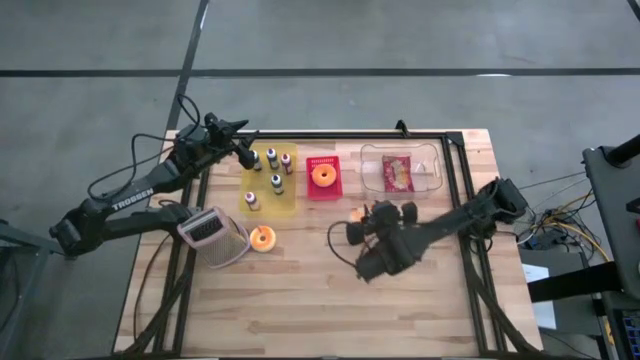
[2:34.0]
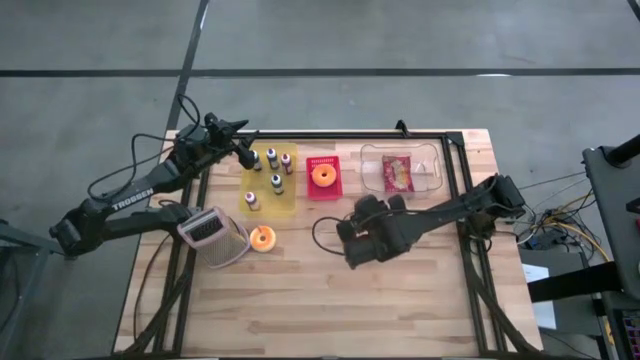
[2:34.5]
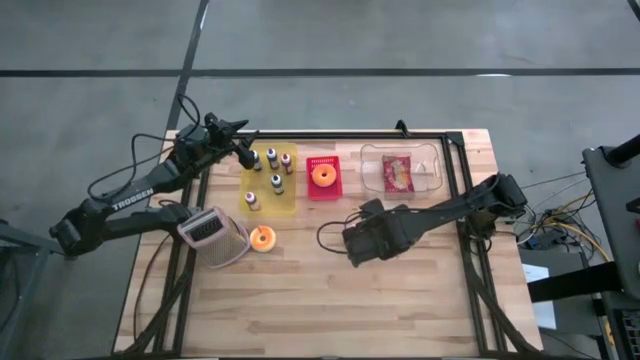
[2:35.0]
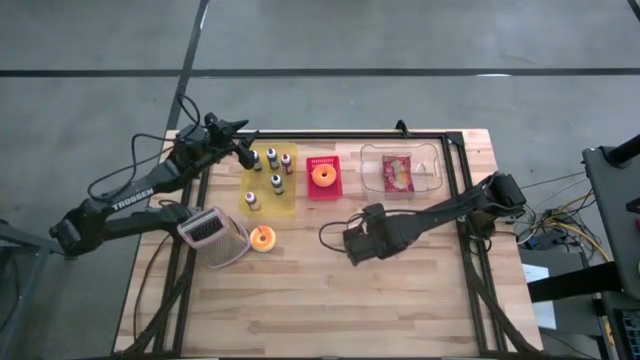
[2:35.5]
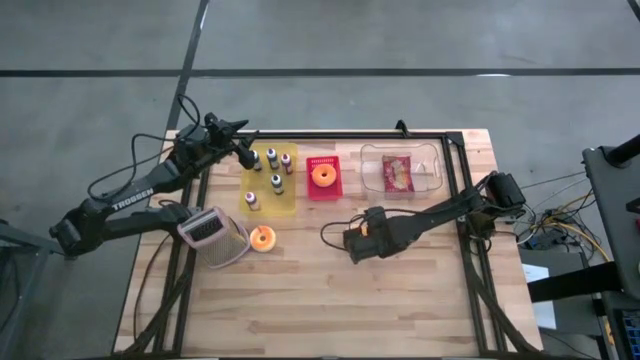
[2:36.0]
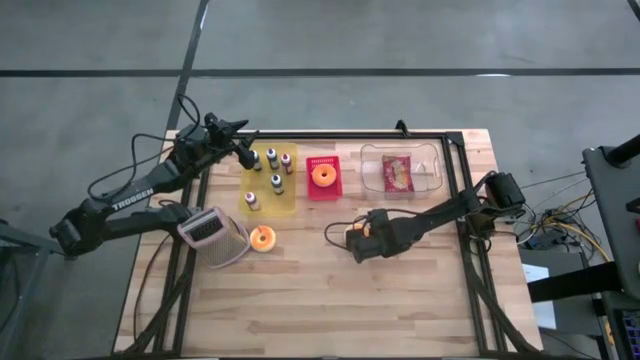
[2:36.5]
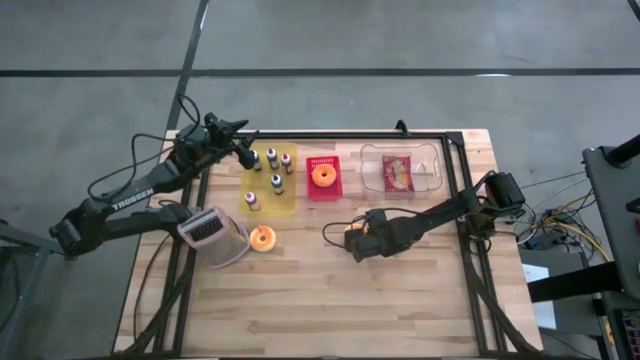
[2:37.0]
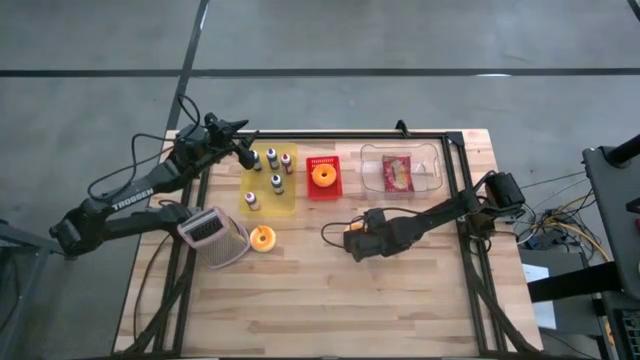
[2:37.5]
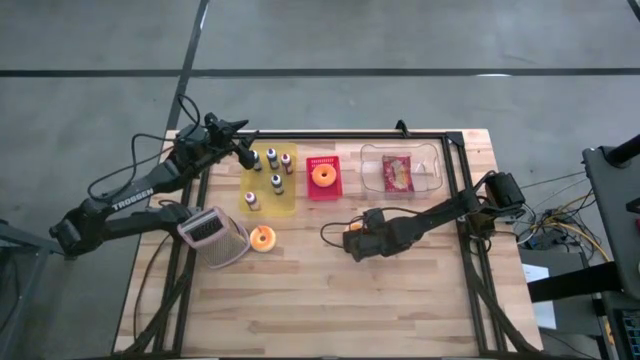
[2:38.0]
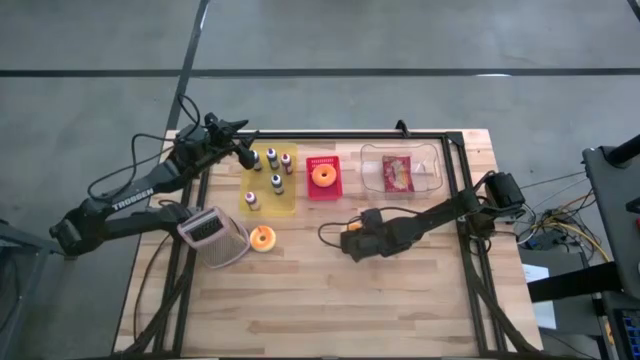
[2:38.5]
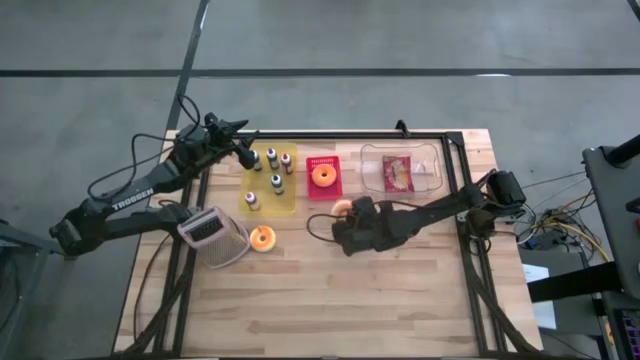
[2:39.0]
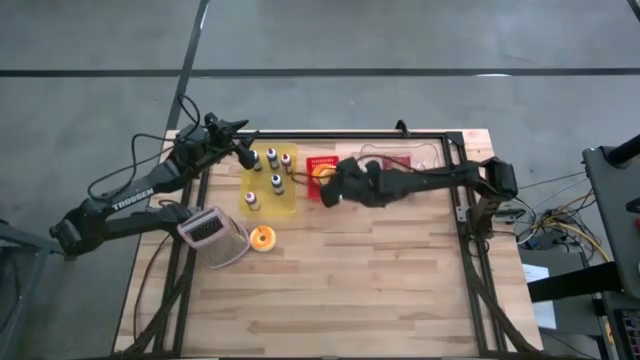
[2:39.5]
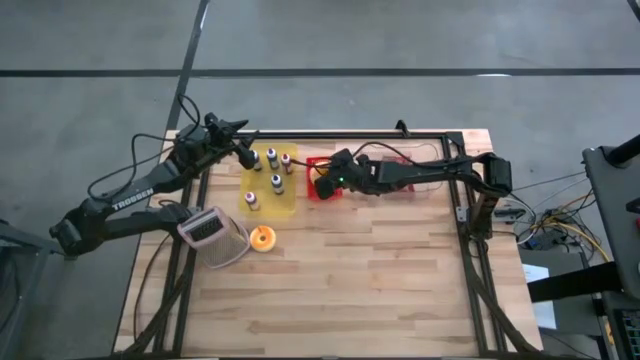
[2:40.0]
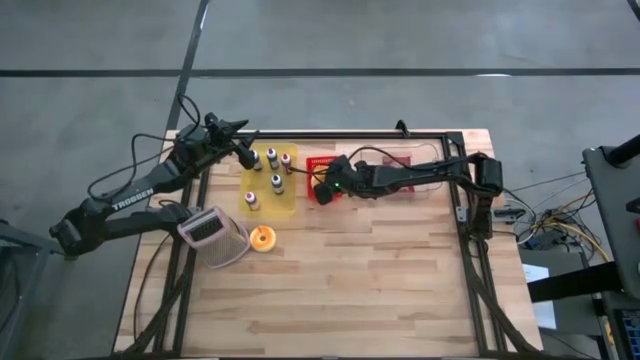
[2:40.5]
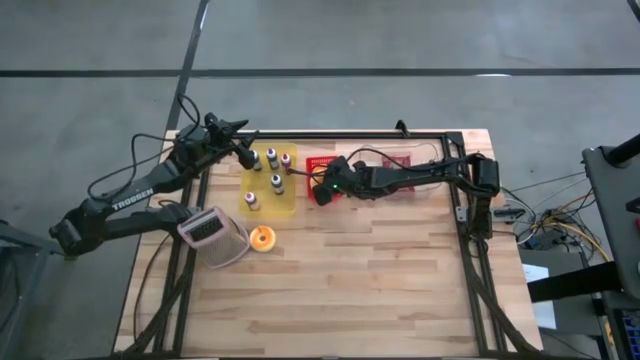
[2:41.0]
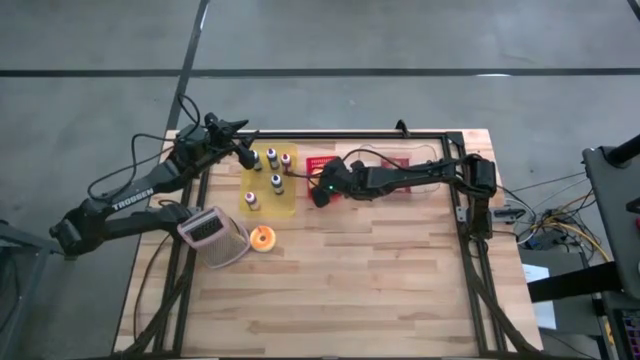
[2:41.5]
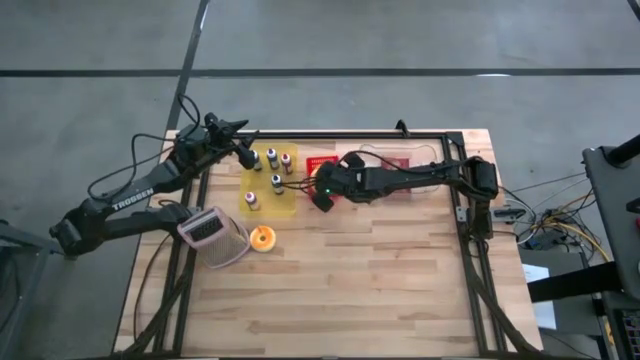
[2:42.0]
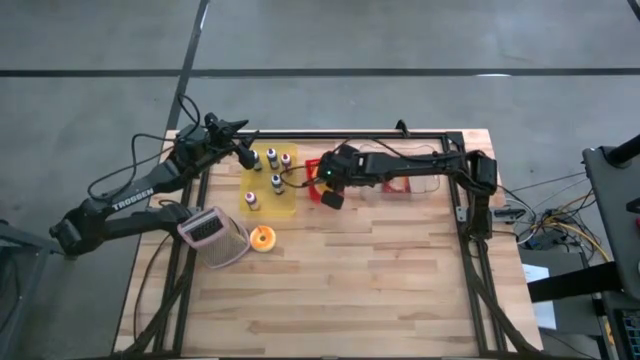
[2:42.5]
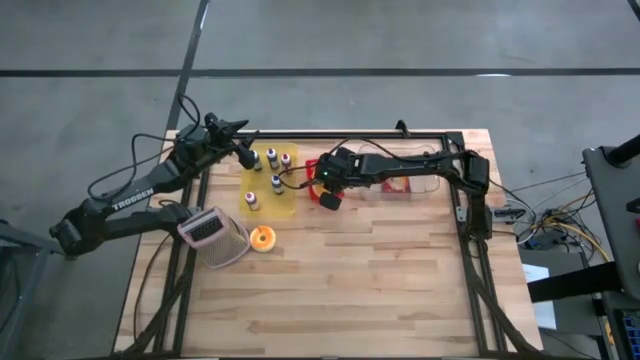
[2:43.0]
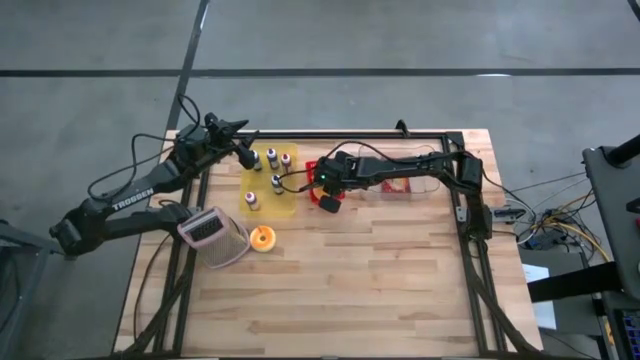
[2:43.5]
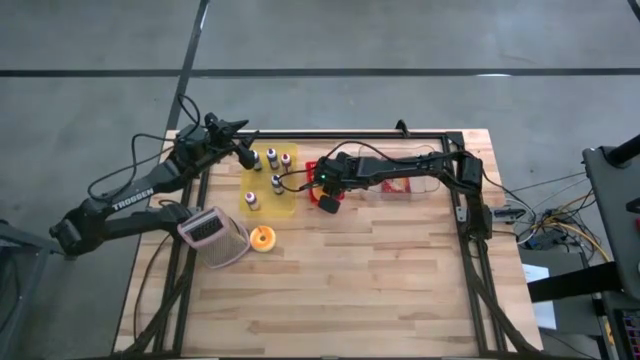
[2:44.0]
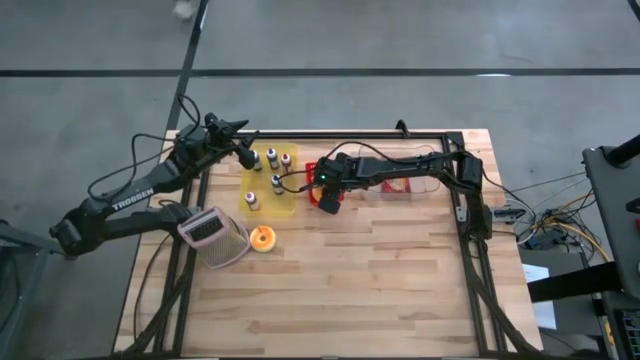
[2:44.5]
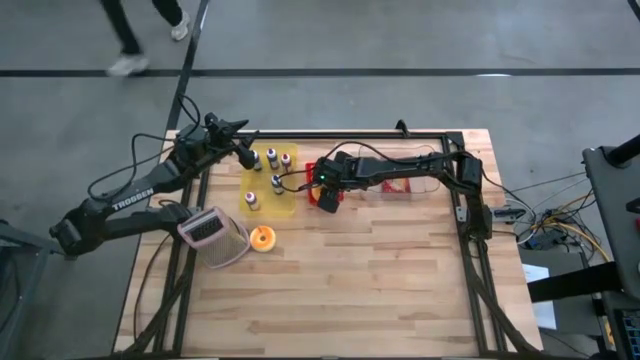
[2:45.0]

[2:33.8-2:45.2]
Task: Pick & Place Food Item
Put the right orange donut into the red bin

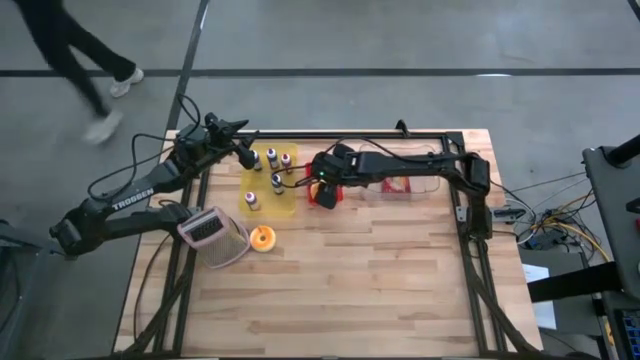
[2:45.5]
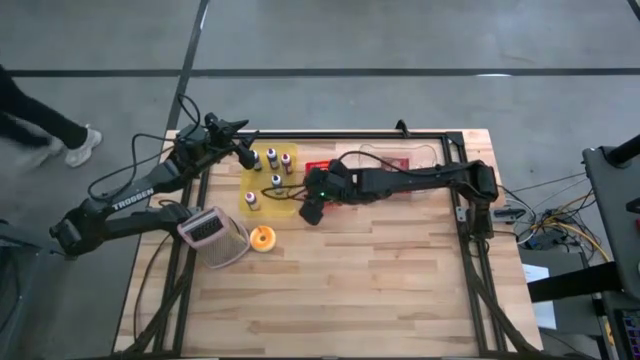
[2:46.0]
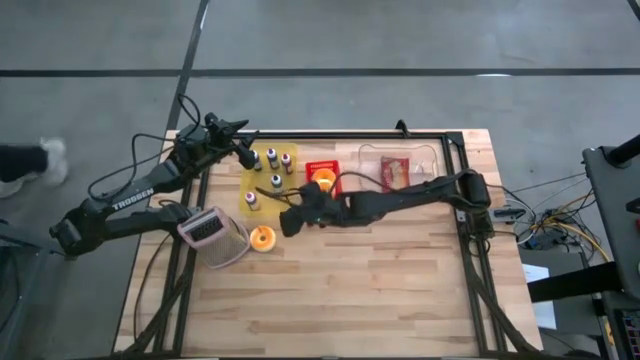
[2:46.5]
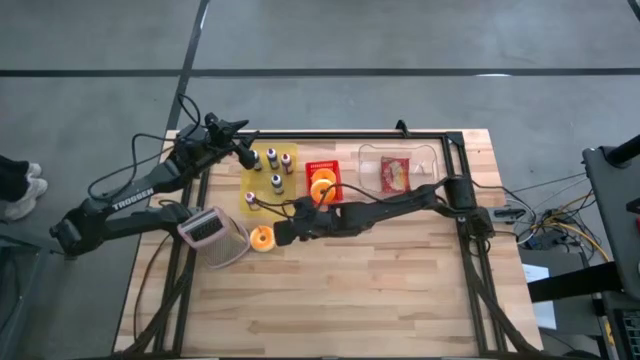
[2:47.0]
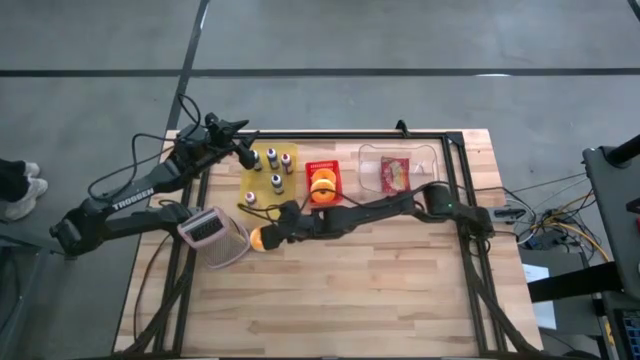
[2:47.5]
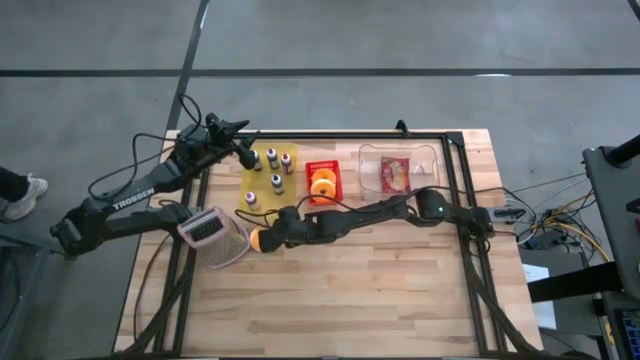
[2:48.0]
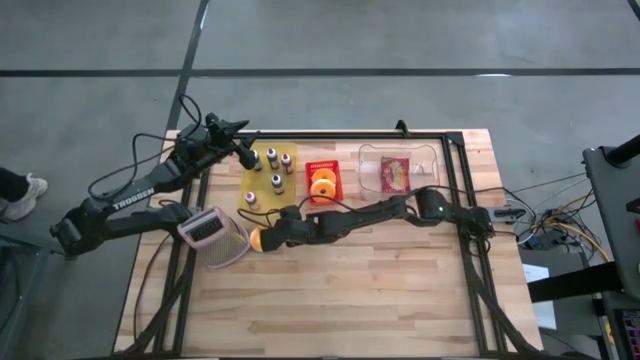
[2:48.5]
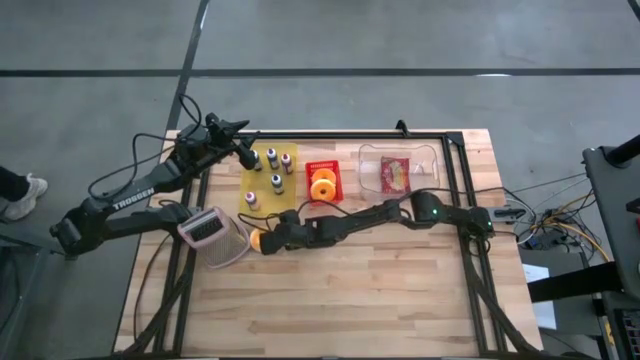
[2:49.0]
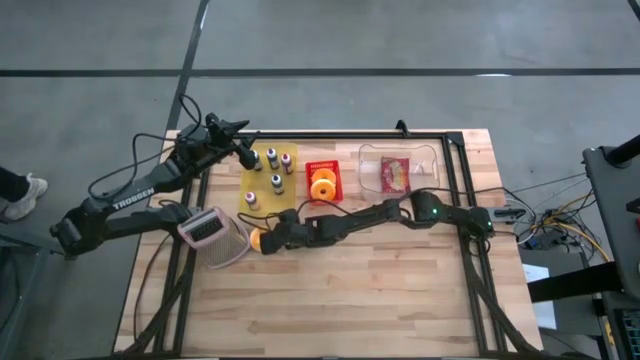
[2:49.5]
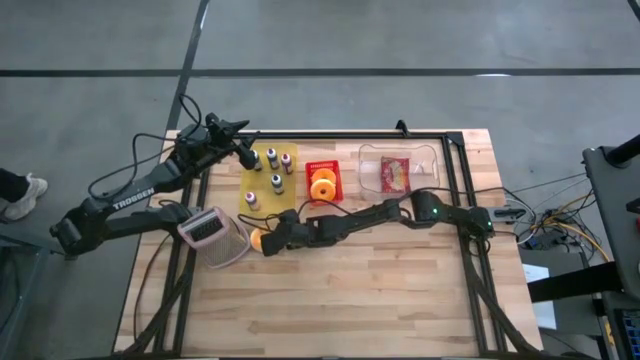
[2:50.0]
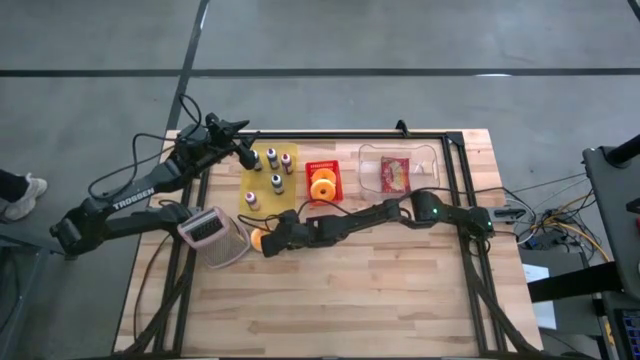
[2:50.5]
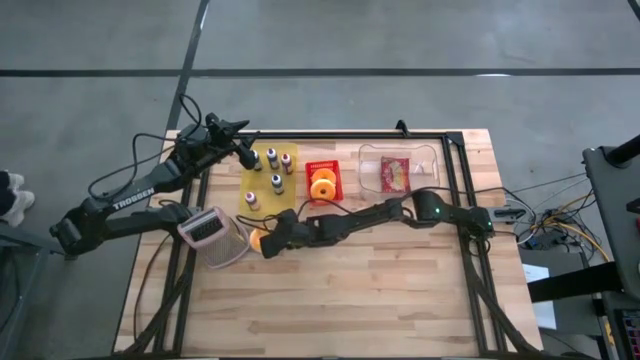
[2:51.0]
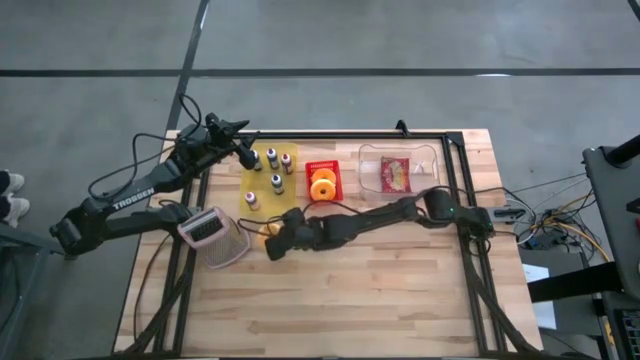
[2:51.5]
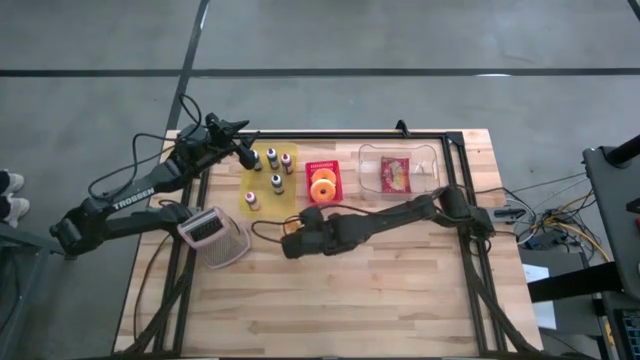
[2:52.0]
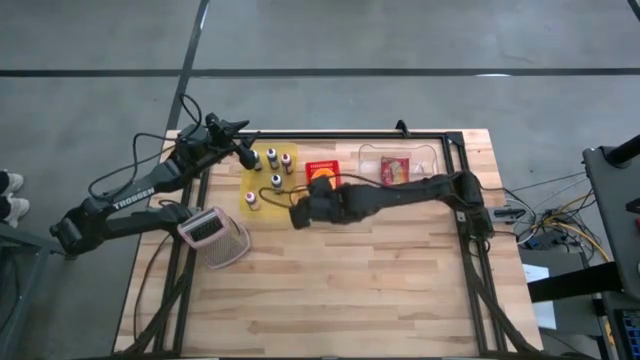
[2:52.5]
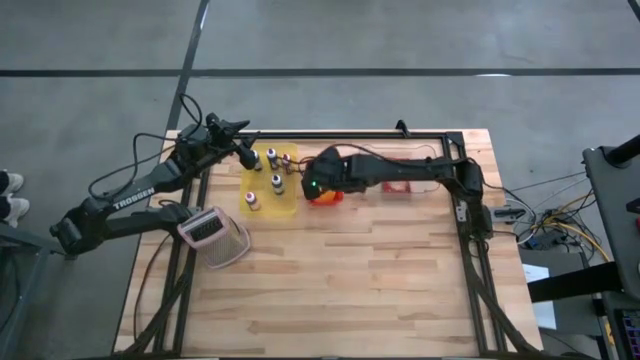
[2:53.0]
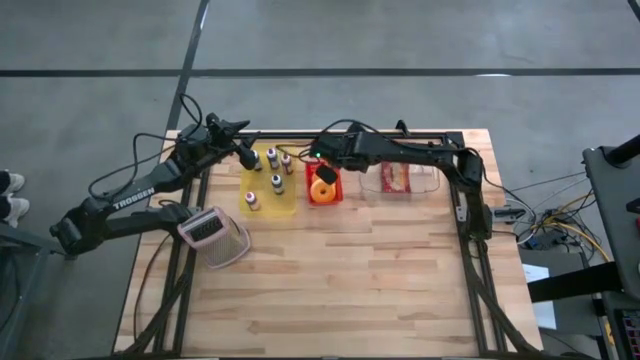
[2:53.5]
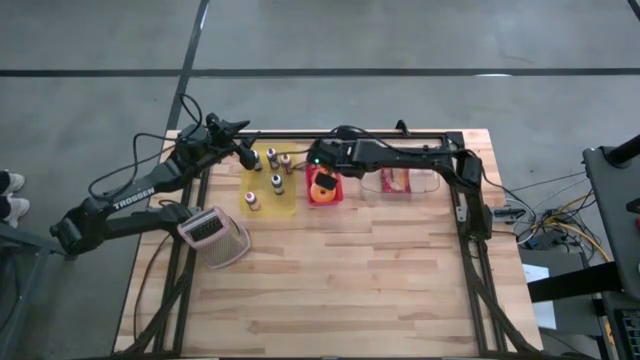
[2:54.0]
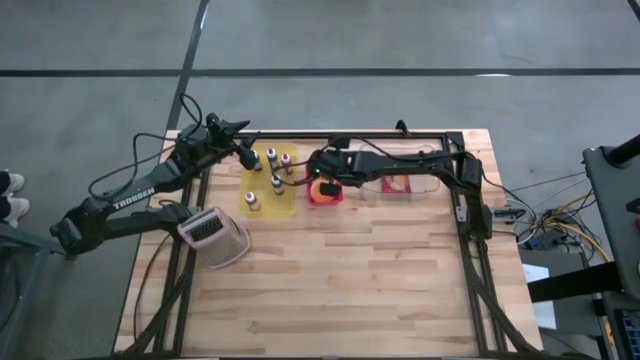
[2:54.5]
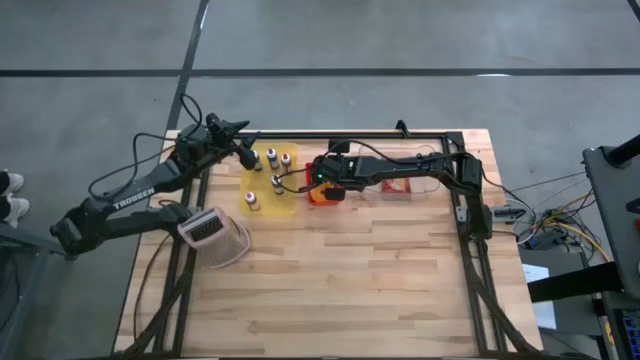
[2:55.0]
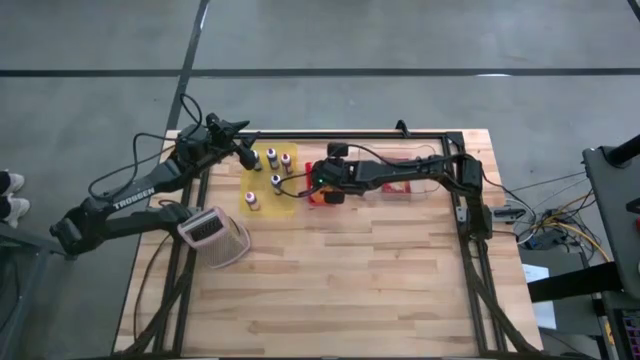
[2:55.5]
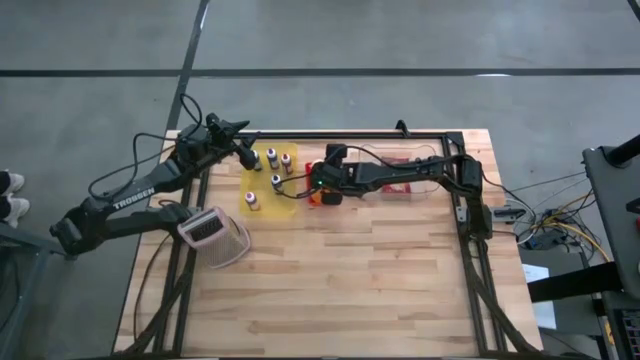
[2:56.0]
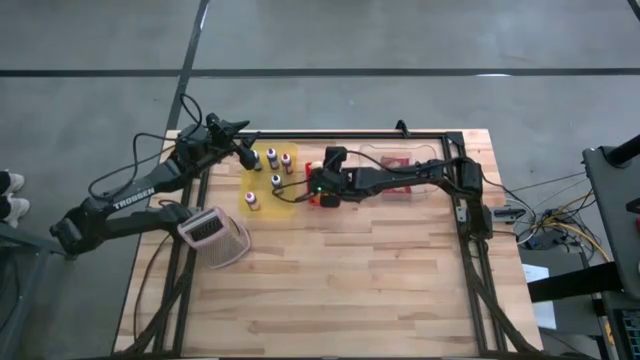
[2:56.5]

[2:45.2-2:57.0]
Put the orange donut into the red bin
